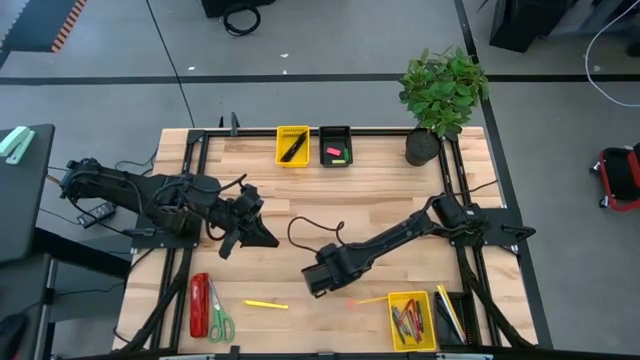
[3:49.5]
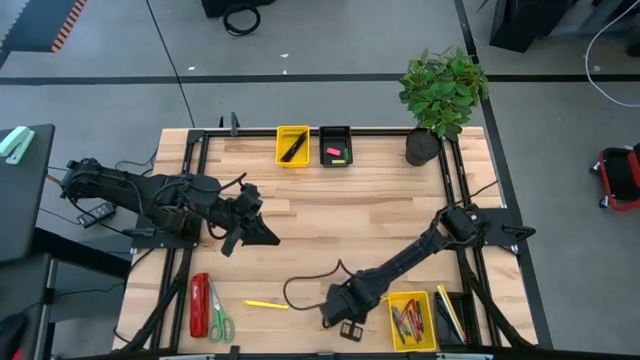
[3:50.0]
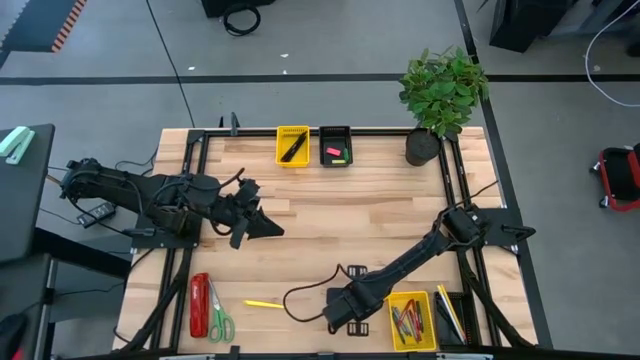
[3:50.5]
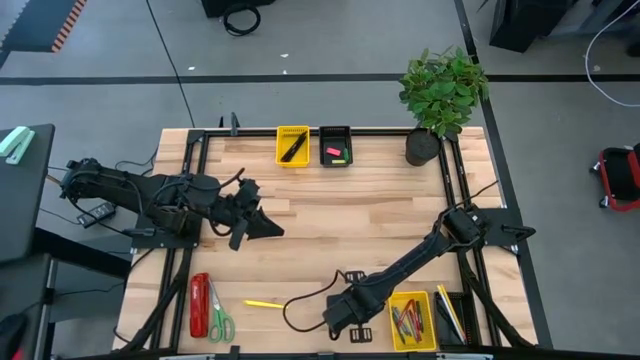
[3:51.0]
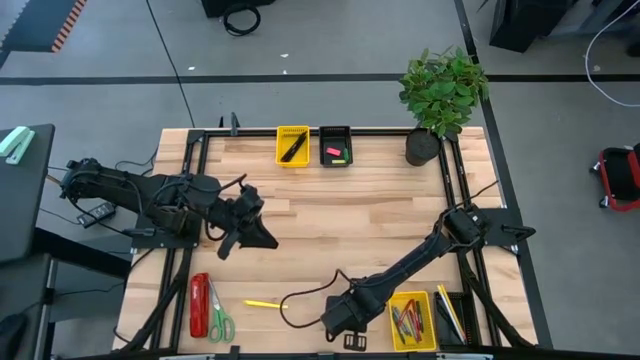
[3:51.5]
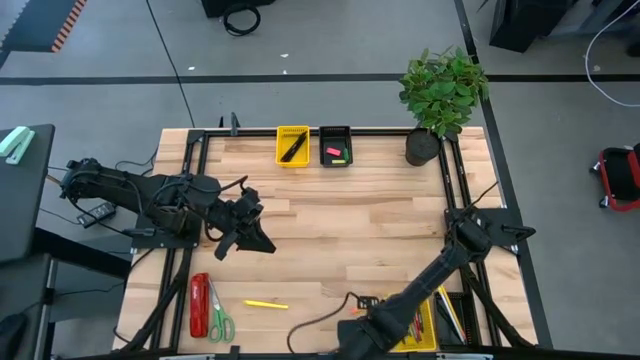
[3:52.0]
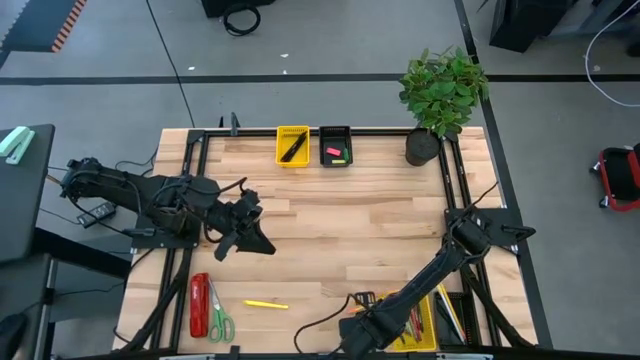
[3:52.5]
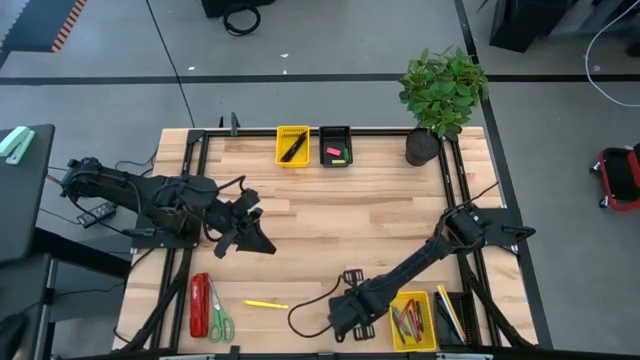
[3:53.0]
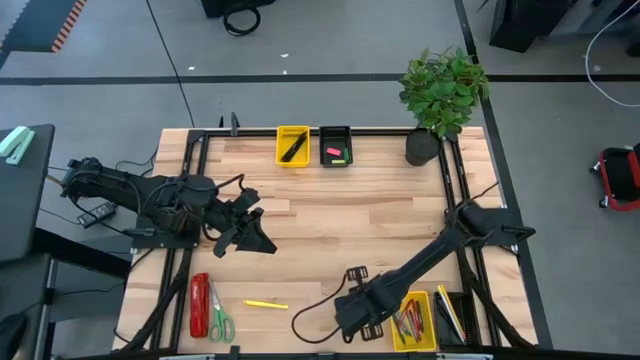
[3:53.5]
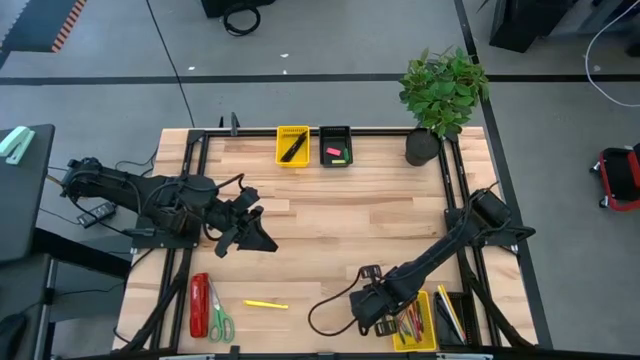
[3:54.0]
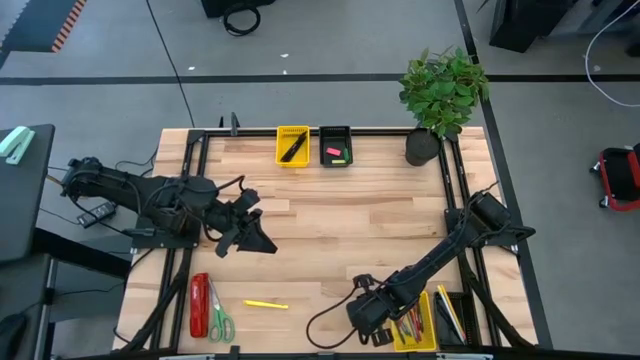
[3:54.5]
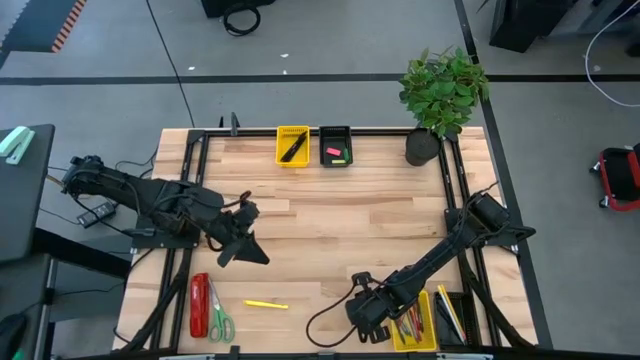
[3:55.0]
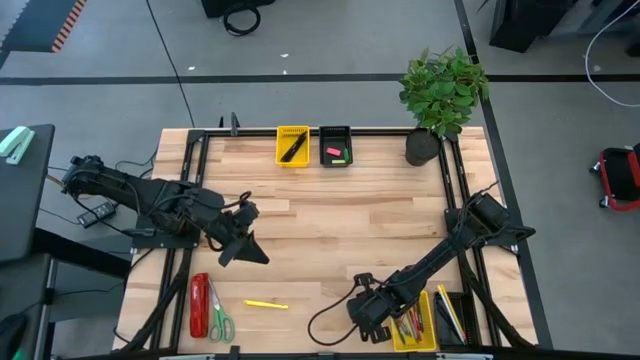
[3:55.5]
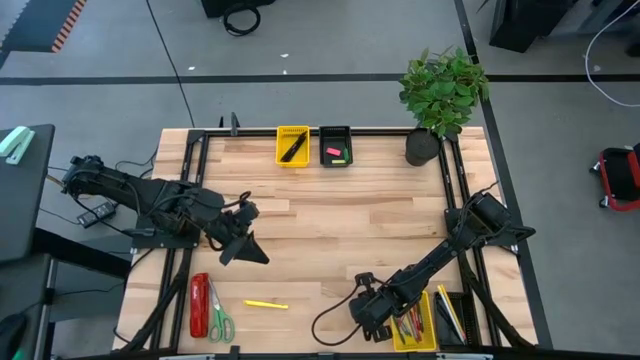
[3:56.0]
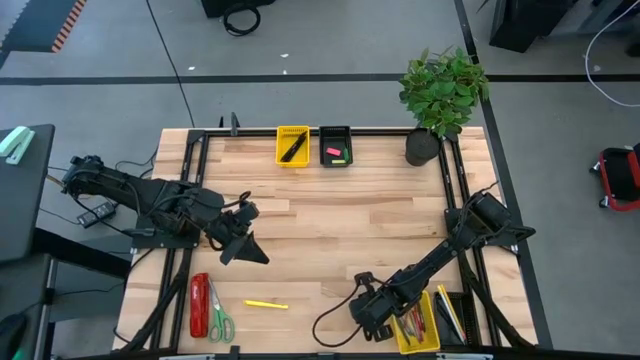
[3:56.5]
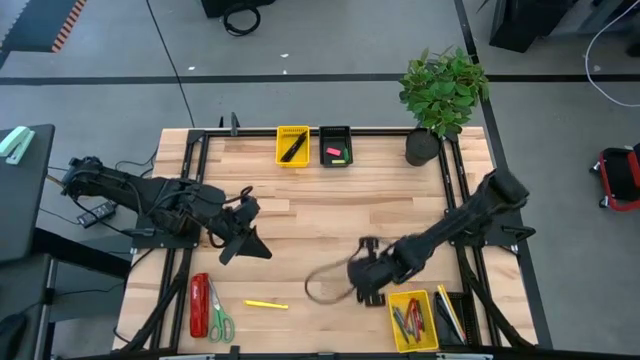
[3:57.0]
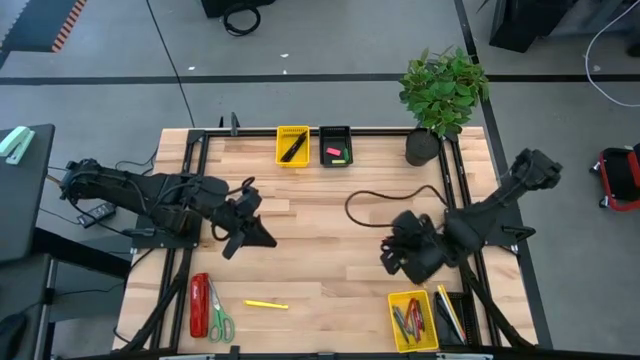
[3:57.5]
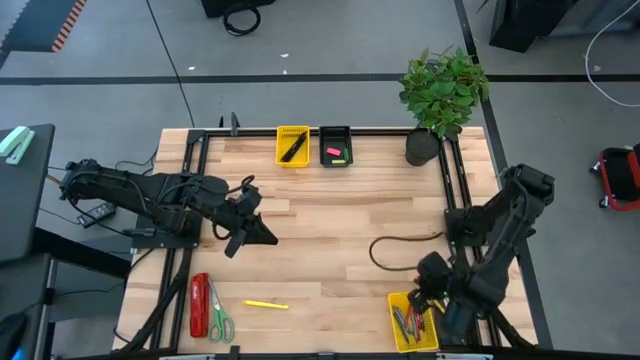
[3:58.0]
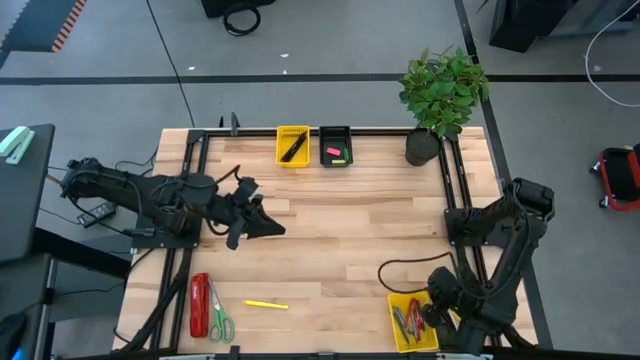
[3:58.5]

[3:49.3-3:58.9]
Task: Sort crayons/erasers/pens/pencils in bins
Put the yellow pencil into the bottom black bin

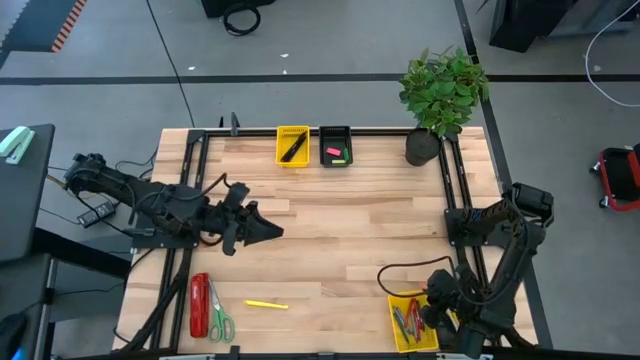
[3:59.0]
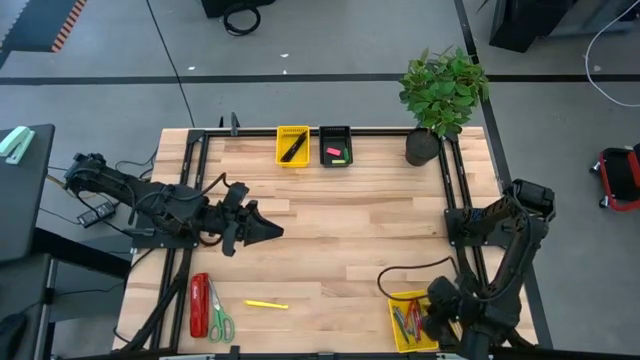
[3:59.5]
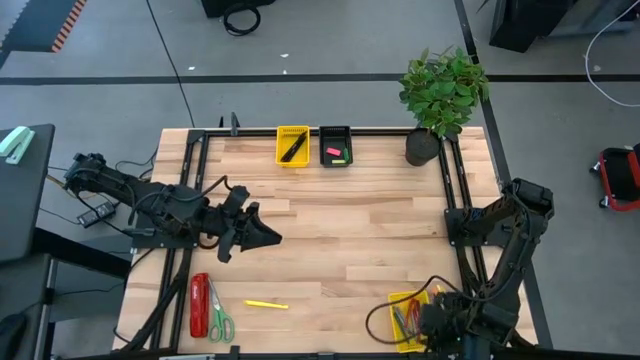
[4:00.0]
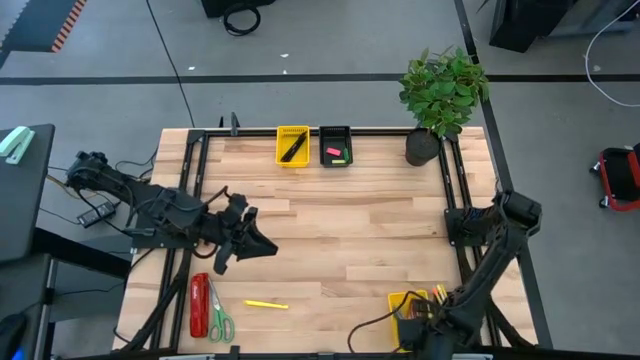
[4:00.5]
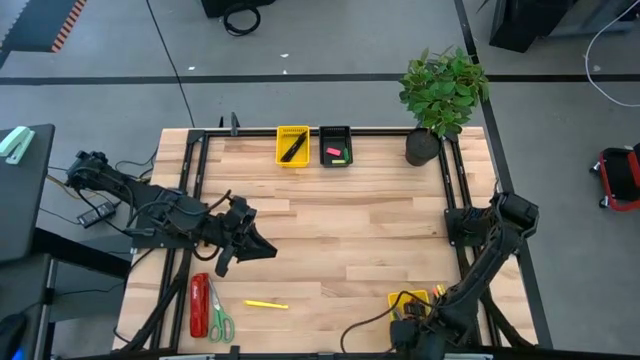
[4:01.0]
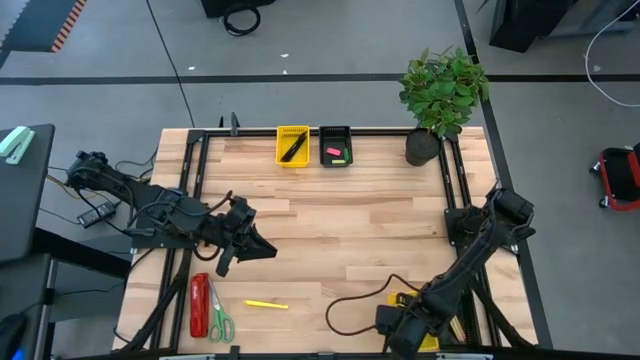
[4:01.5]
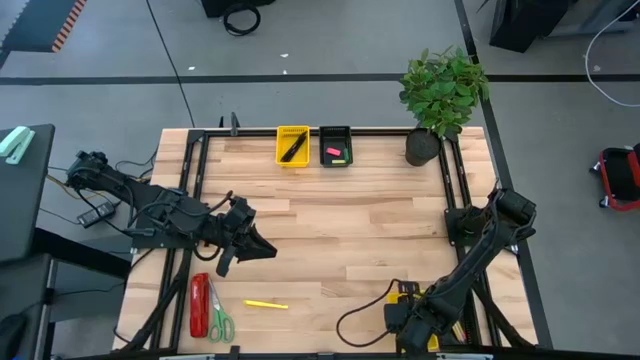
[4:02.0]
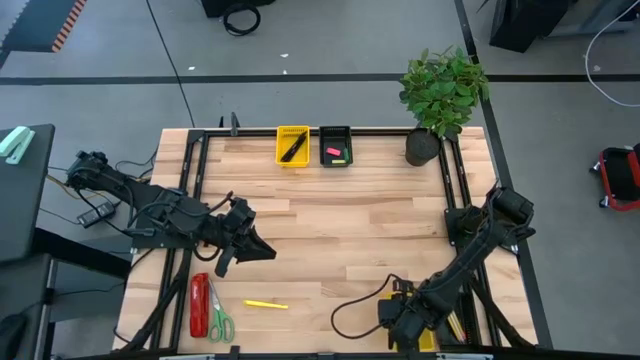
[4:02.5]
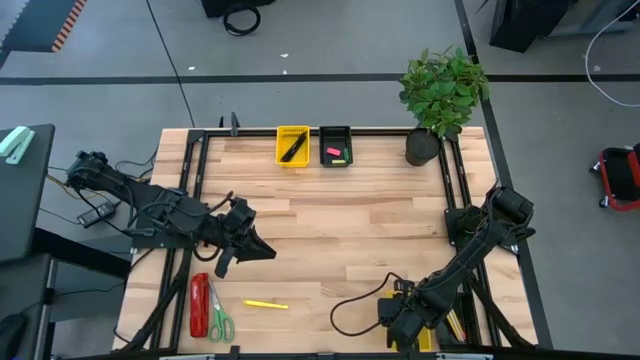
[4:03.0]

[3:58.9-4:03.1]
Adjust the bottom yellow bin

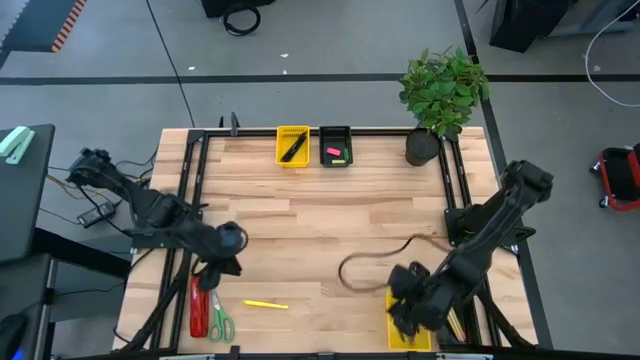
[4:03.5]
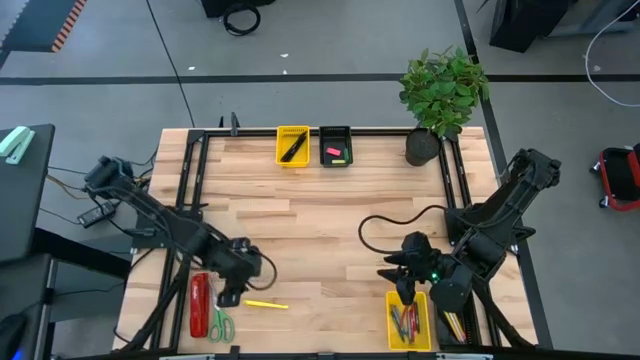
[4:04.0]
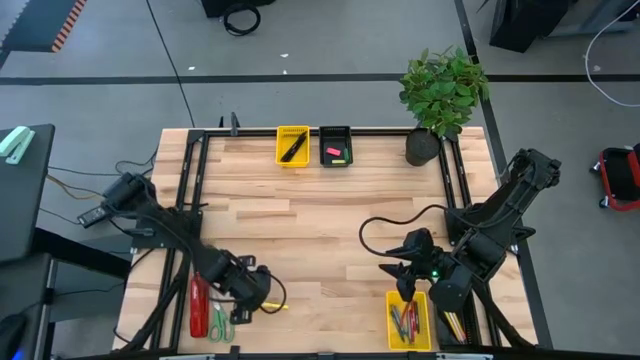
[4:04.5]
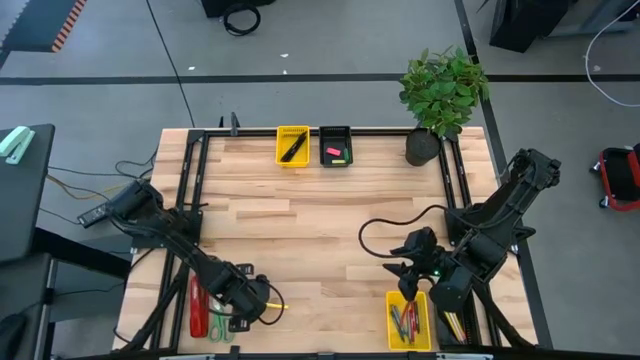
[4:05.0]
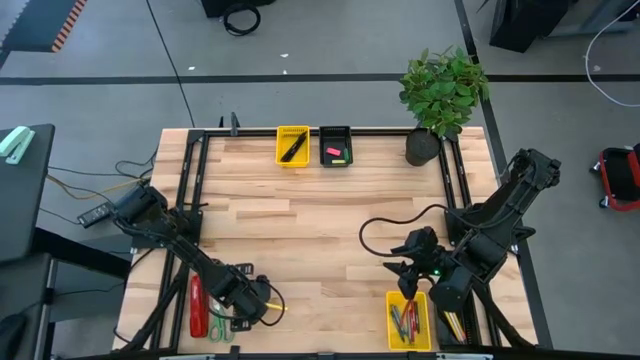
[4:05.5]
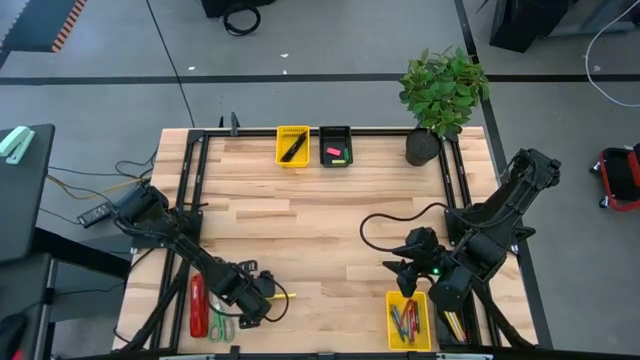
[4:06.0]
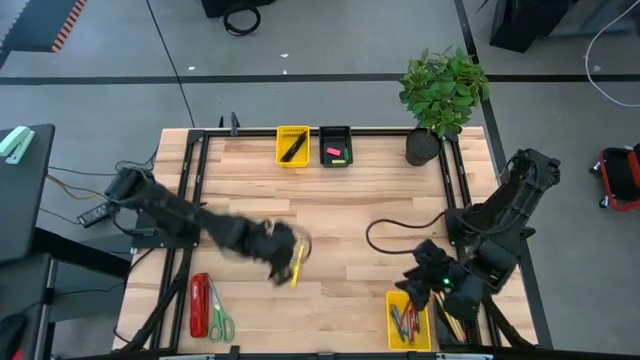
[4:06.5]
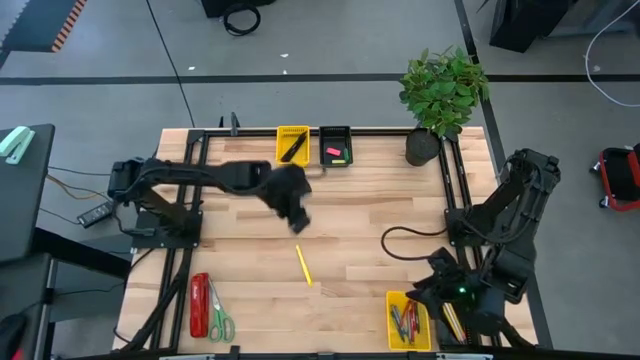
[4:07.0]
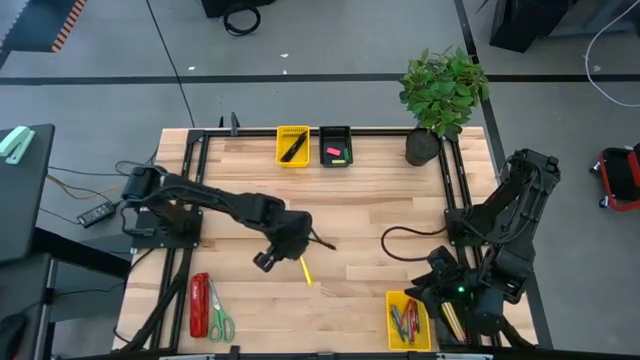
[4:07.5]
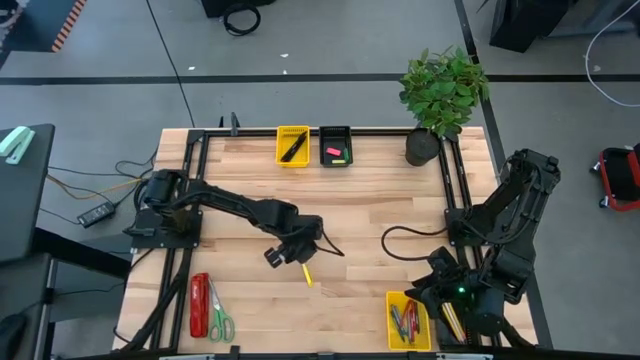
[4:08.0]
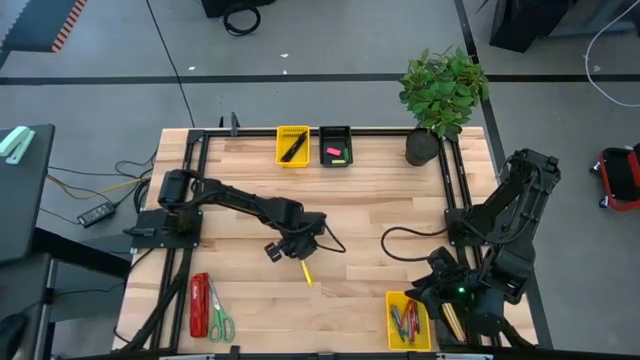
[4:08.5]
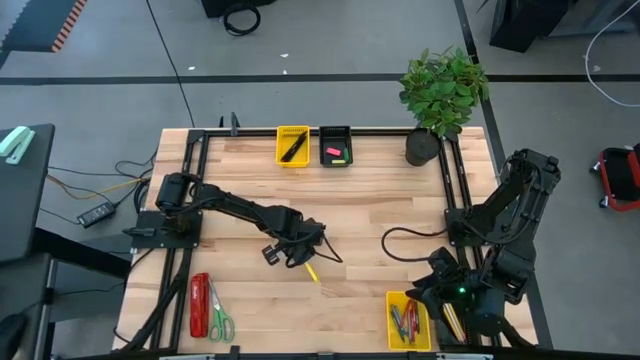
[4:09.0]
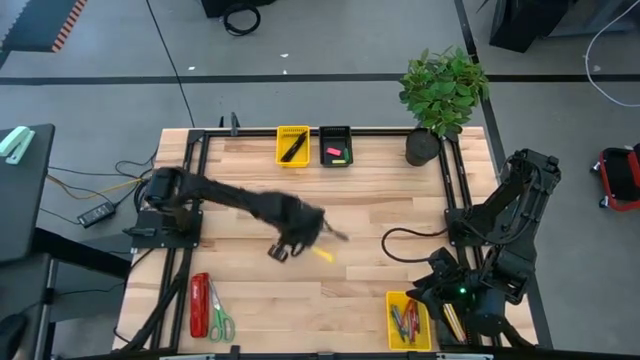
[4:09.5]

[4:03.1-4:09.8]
Put the yellow pen into the top yellow bin
